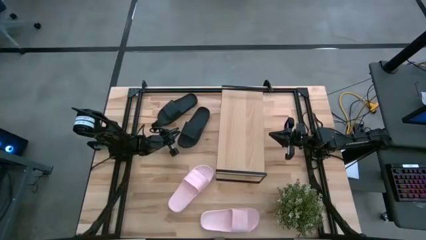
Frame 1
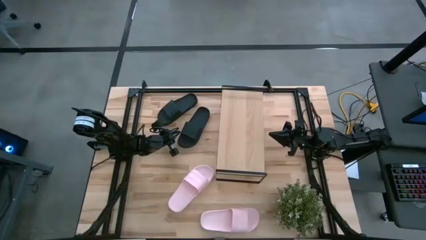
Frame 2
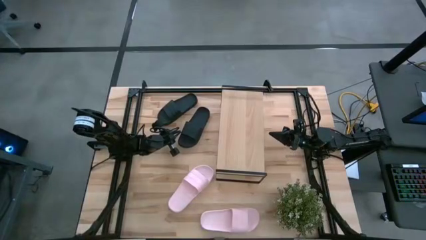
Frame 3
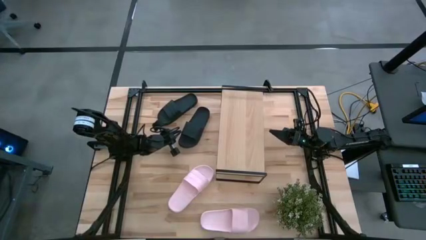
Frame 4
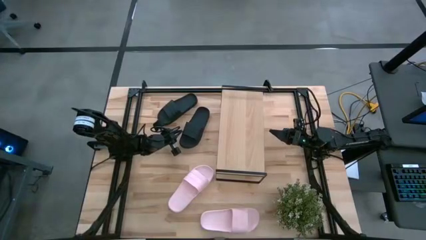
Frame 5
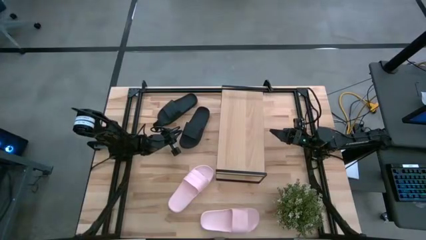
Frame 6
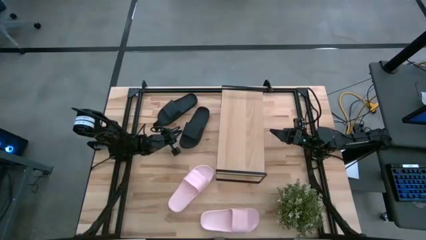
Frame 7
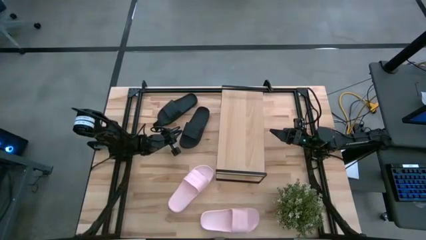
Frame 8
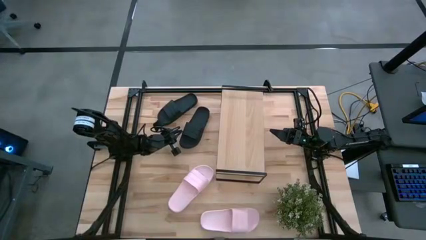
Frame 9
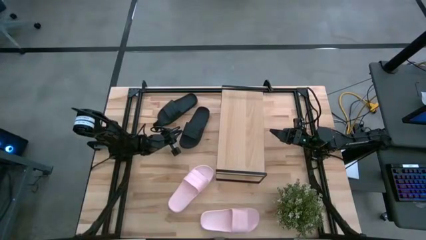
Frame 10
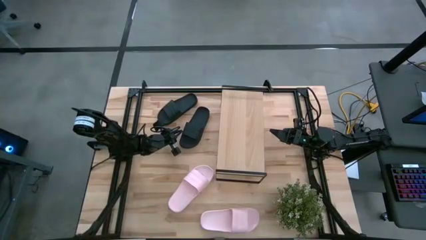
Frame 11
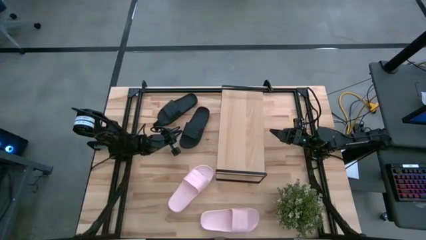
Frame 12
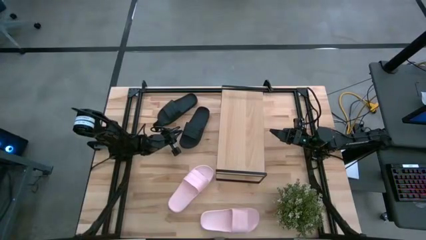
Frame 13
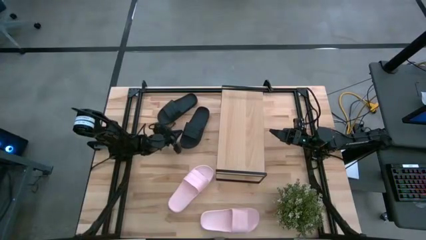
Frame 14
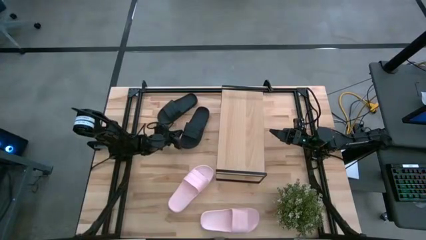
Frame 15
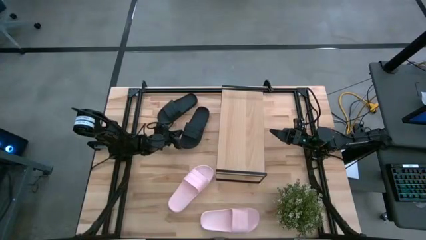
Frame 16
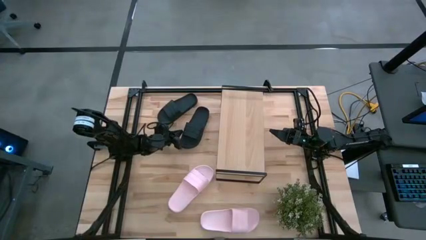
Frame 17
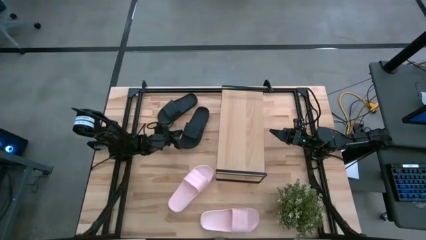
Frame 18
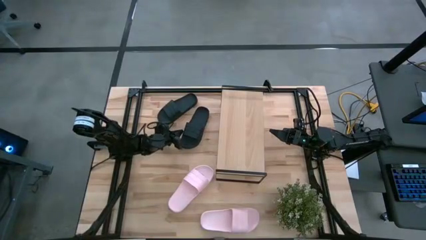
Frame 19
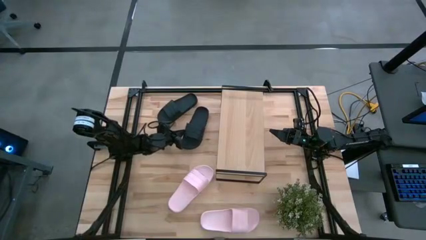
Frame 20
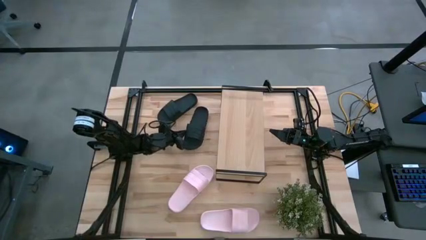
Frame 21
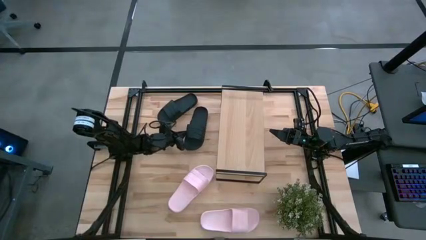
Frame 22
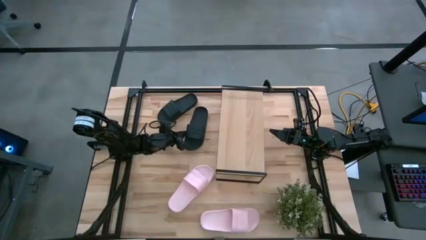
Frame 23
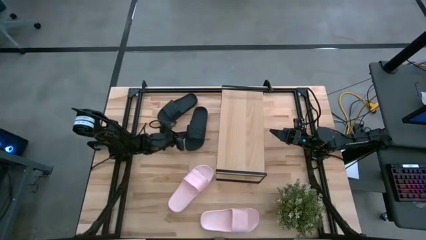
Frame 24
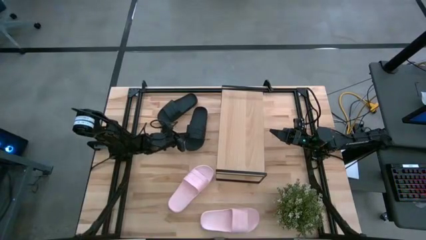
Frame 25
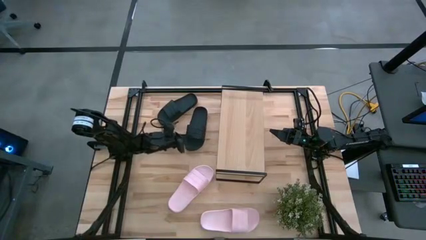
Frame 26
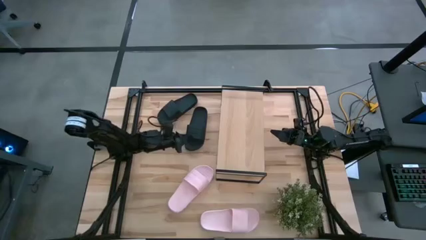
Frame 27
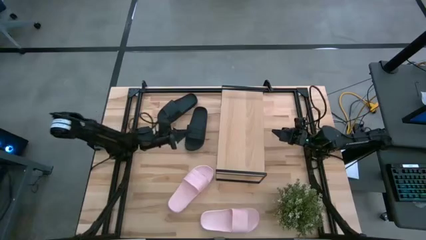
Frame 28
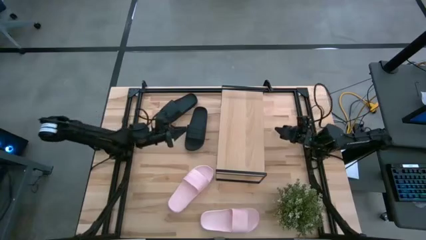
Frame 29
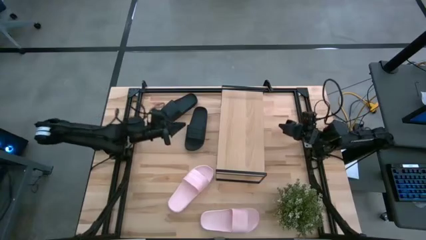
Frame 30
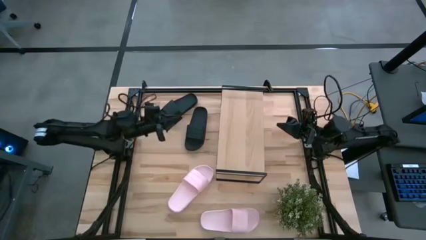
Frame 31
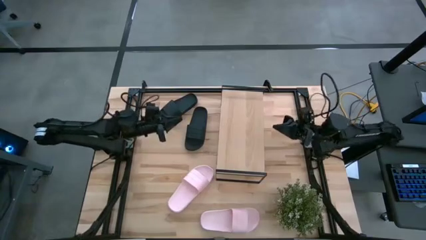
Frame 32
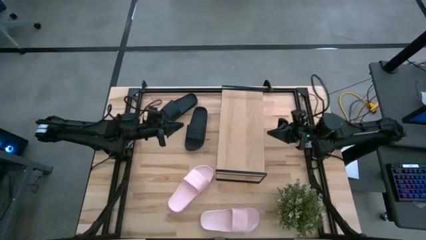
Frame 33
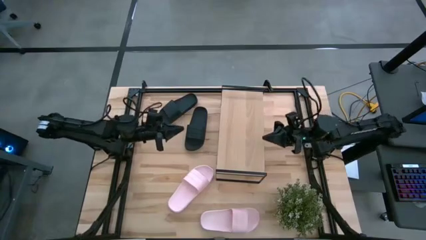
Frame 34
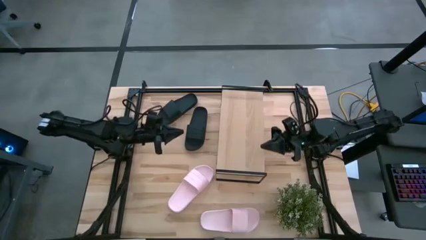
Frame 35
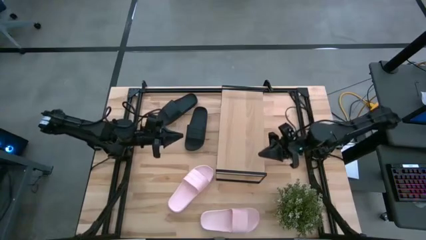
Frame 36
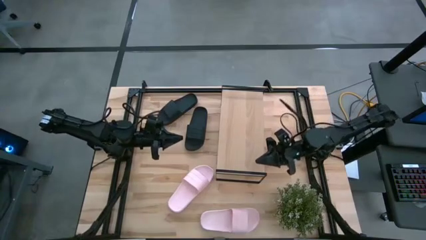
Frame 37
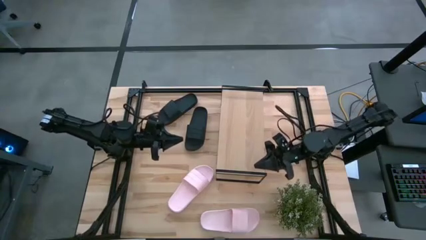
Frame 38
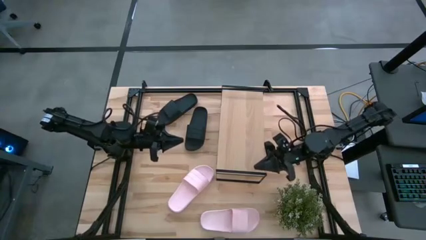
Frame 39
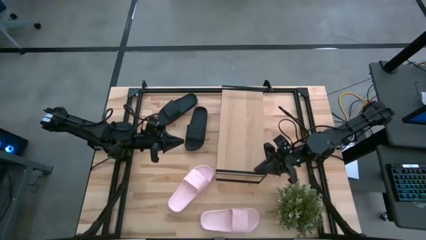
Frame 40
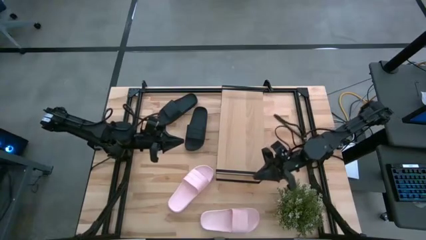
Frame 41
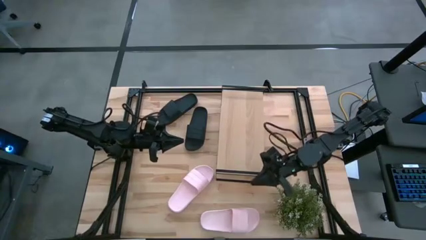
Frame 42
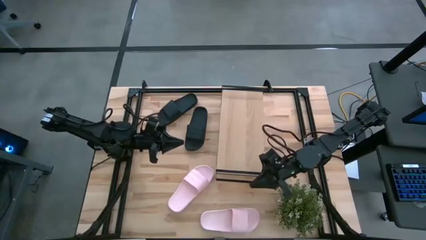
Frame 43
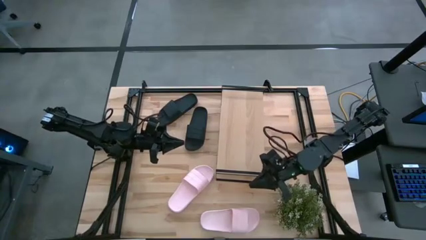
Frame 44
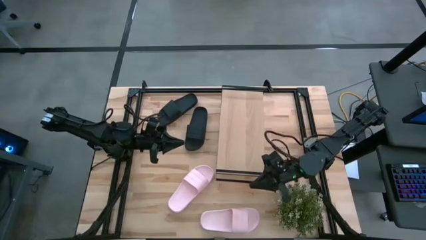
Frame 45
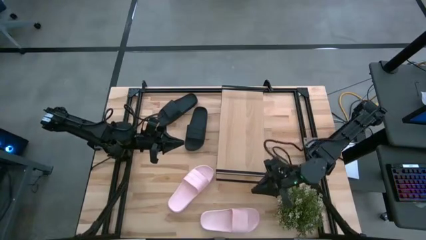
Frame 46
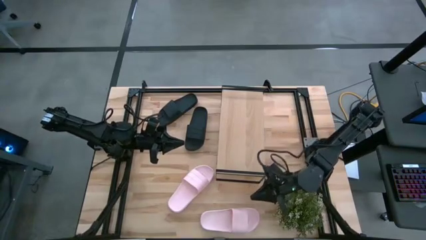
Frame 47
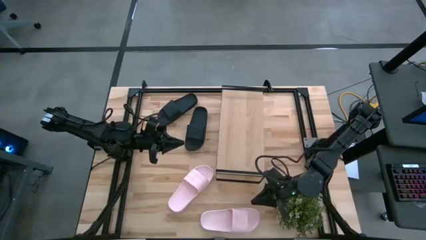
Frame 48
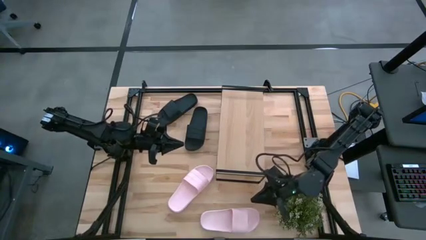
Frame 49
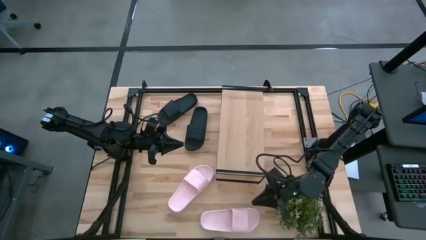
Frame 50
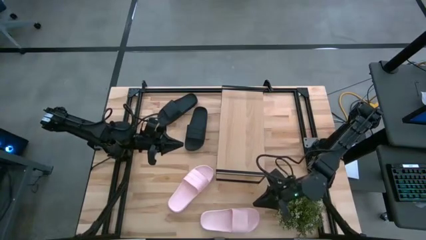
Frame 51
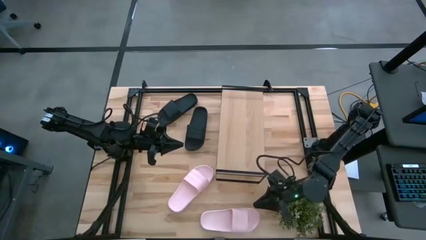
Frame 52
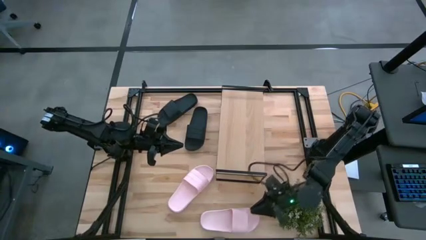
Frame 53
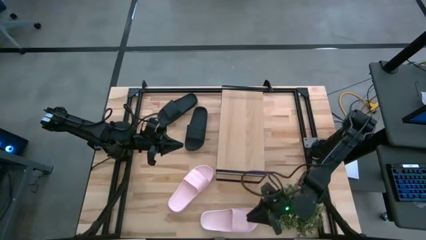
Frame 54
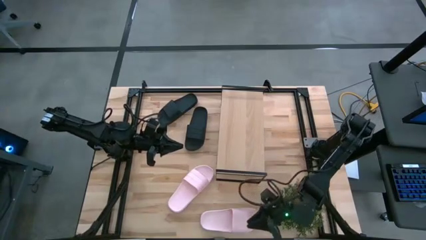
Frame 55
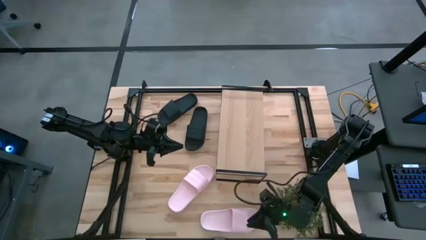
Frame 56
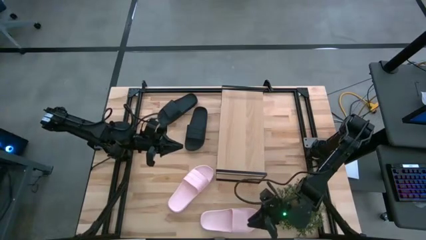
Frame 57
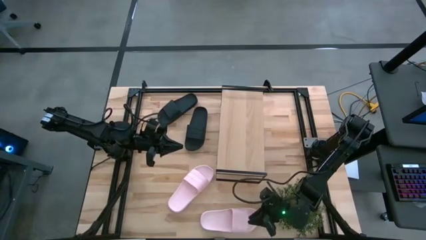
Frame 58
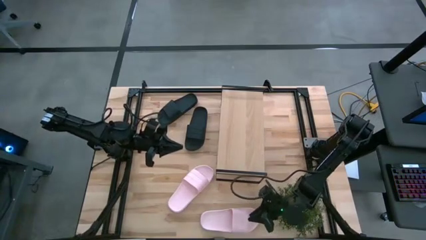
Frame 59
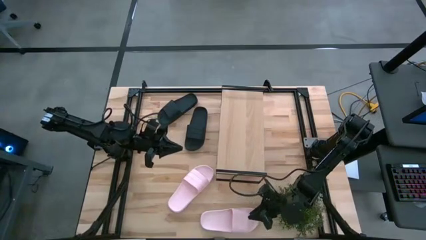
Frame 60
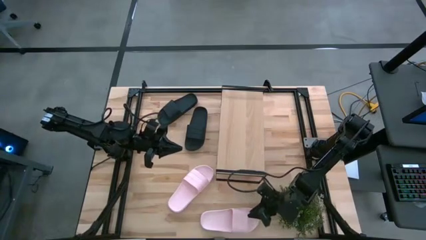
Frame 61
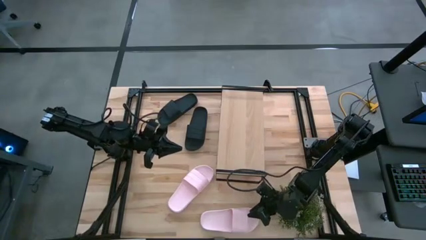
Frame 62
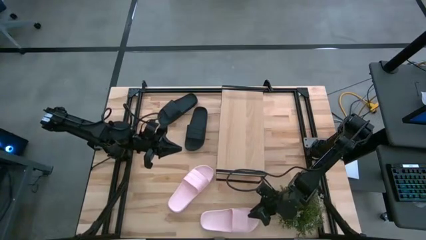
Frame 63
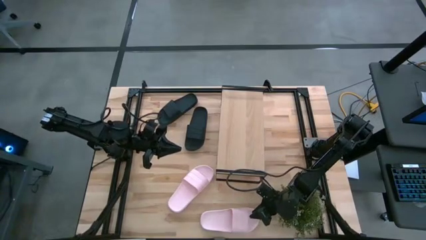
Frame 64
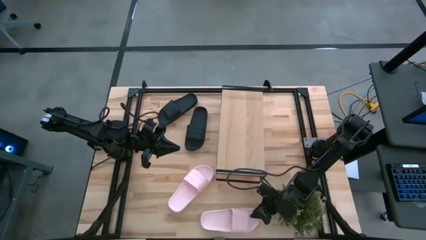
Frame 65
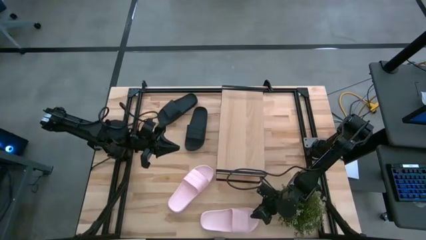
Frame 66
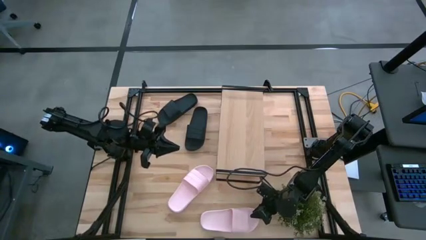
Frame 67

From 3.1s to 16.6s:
Task: Pick and place slides into the shelf
Put the bottom light pink slipper on the shelf
